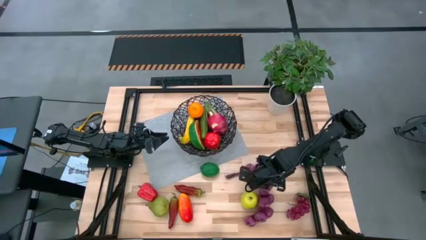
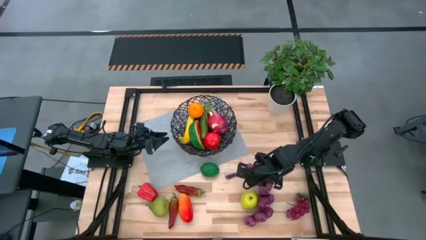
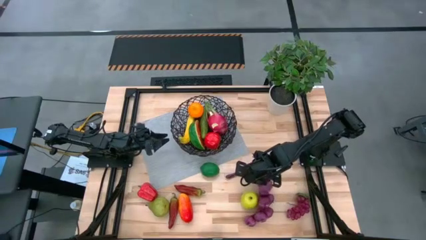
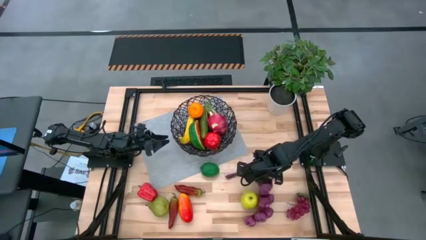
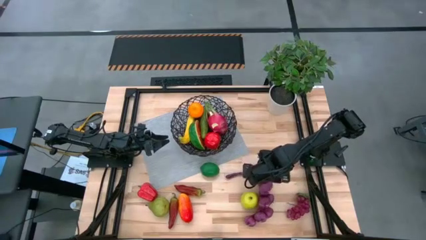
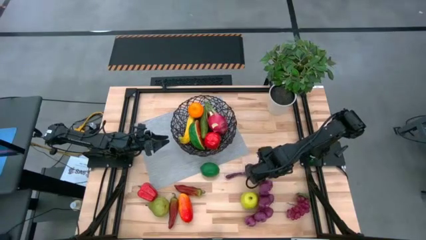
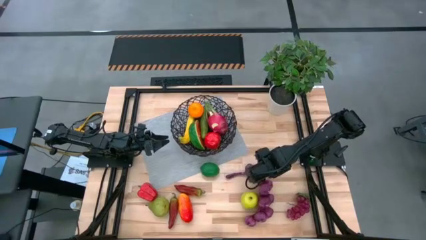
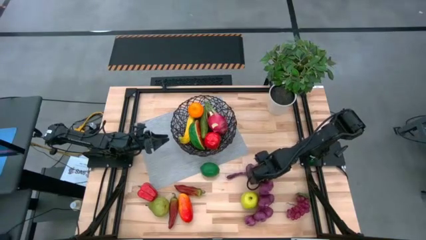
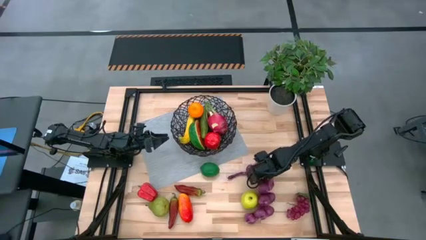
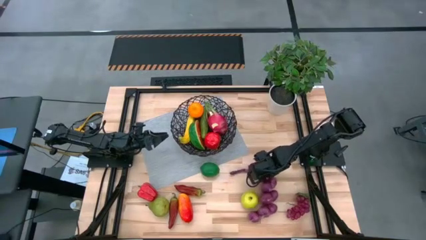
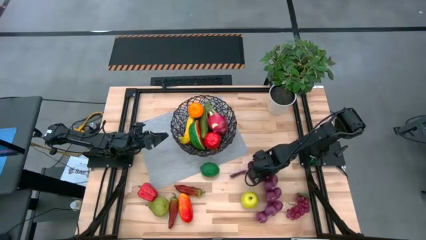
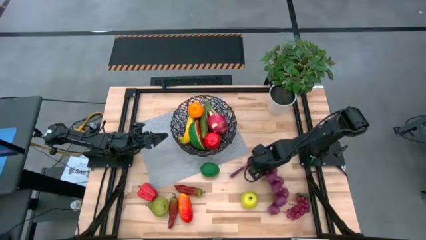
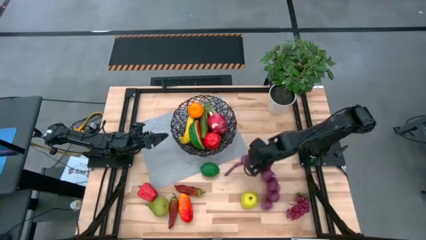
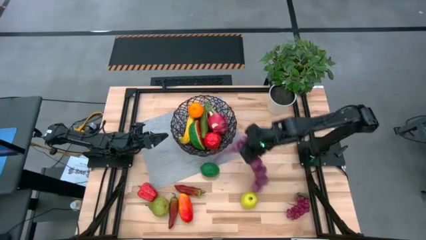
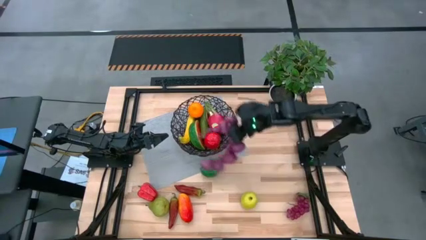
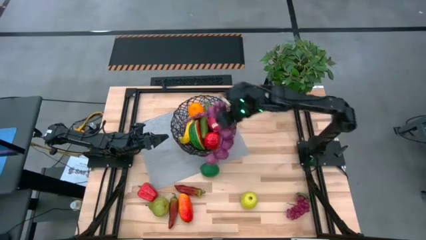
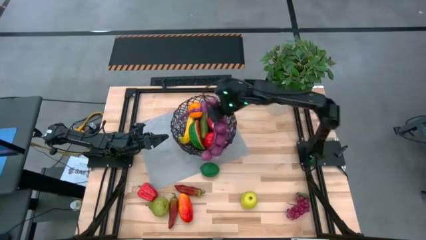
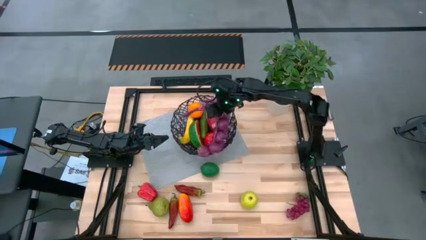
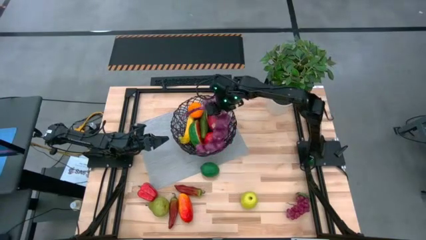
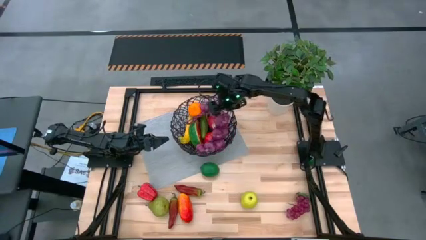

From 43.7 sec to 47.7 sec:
Task: Build produce basket
Put the onions into the wire basket

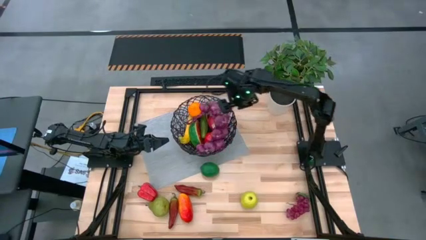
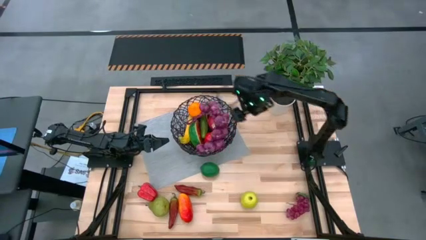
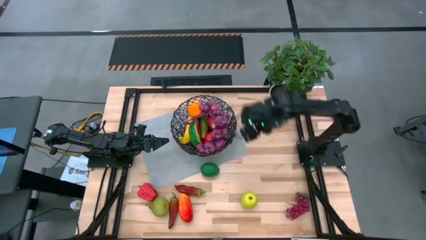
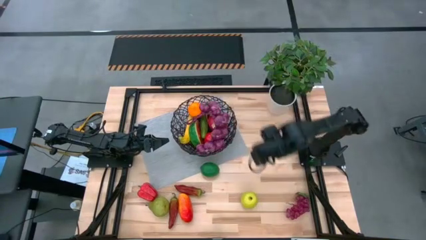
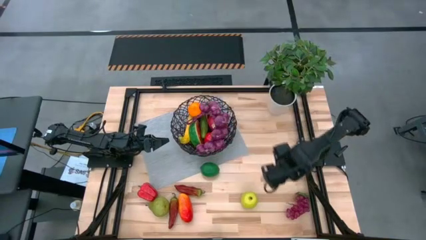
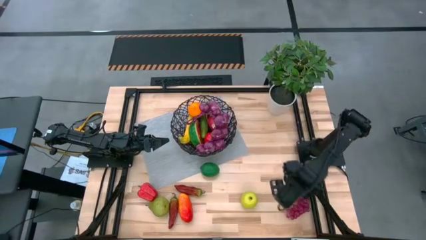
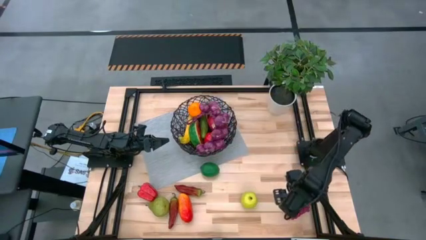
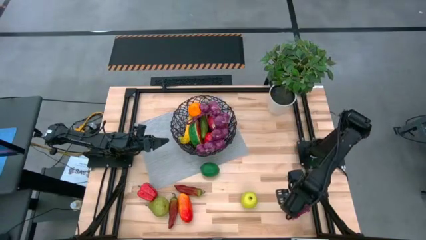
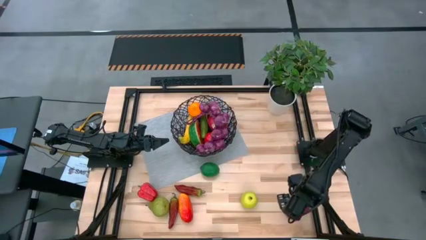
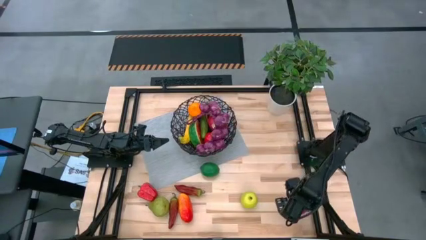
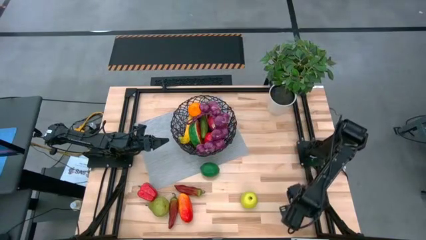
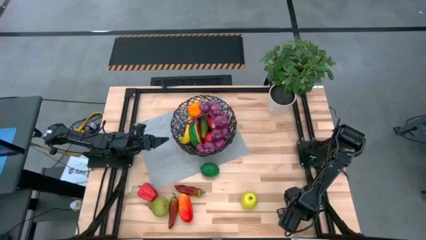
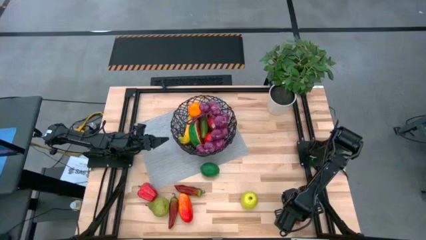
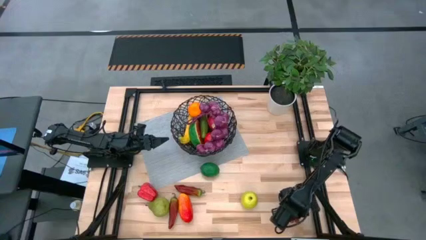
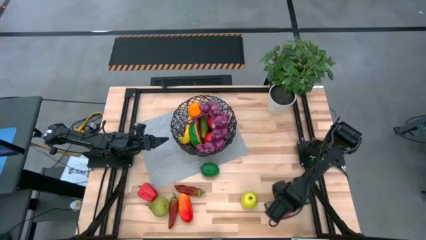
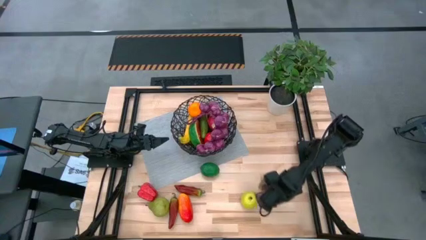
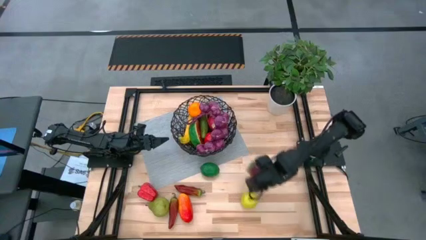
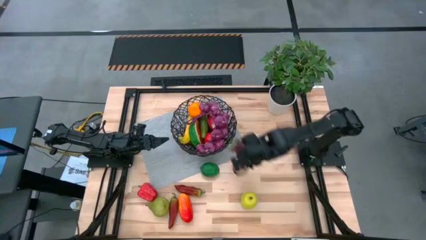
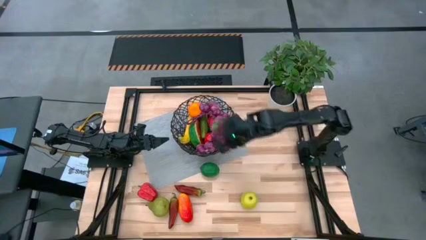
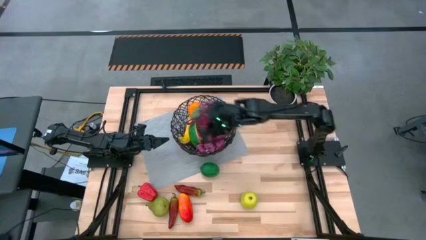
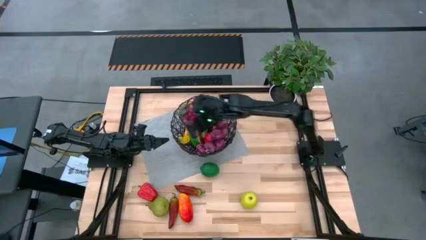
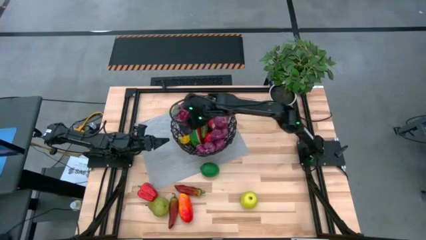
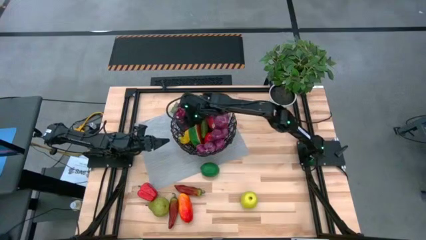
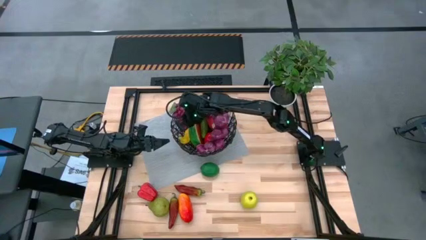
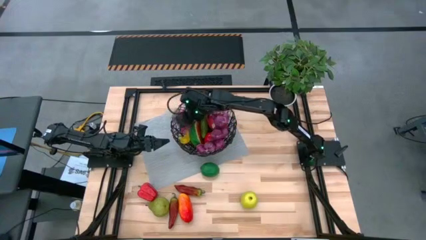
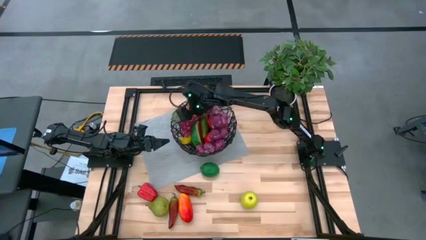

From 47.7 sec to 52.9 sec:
Put the grapes into the wired basket

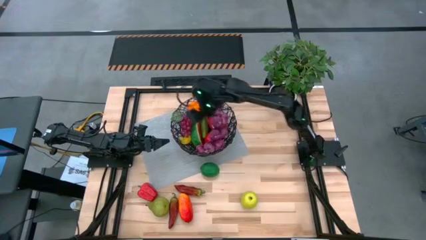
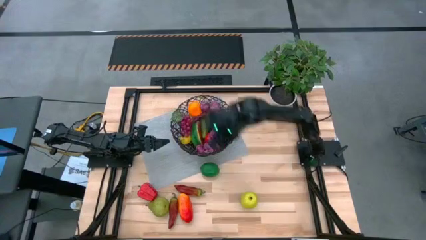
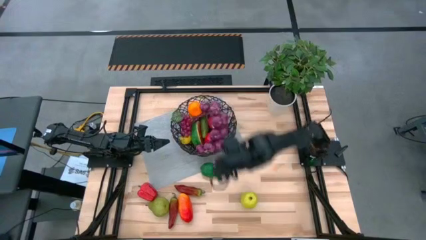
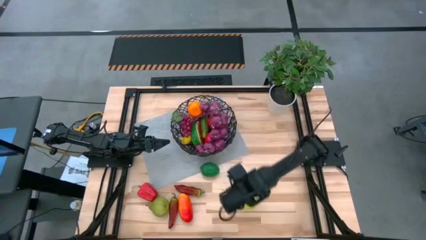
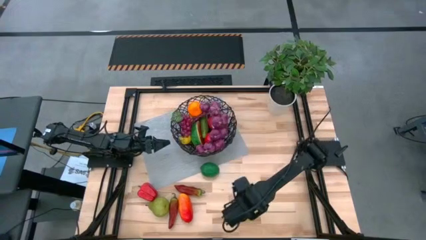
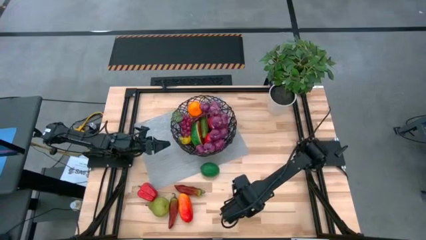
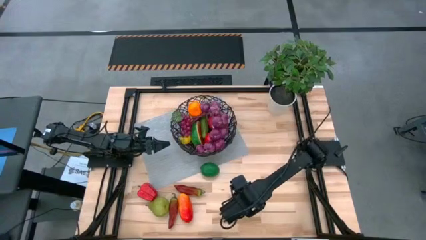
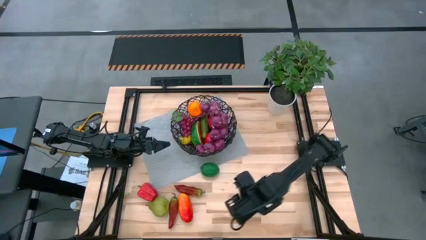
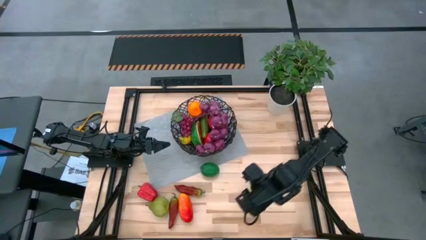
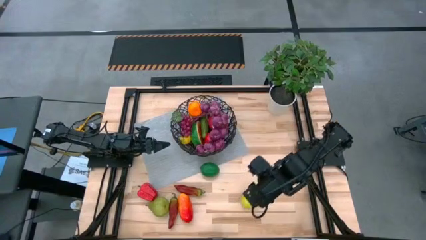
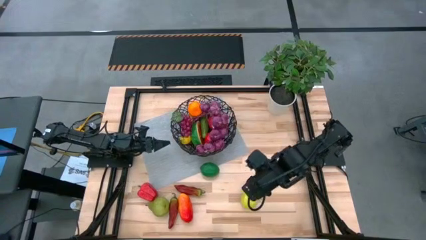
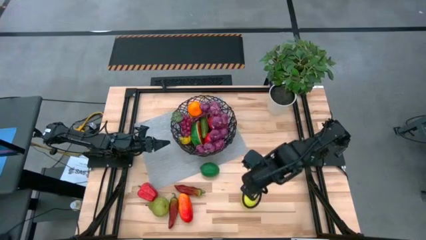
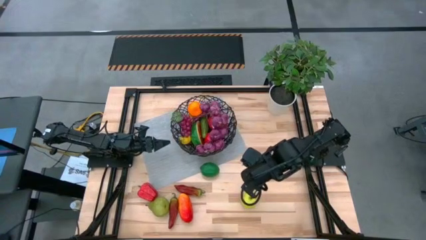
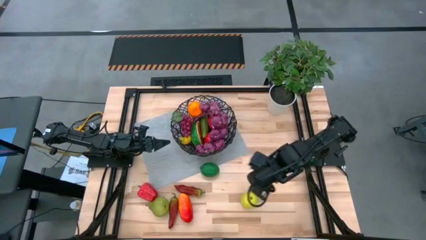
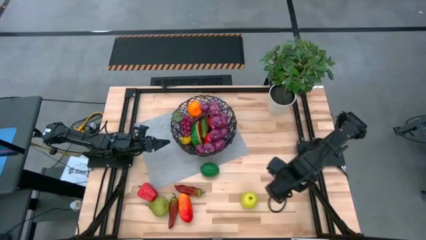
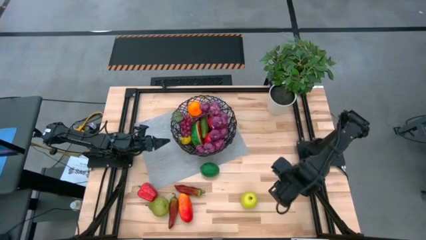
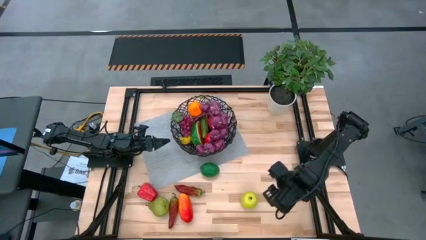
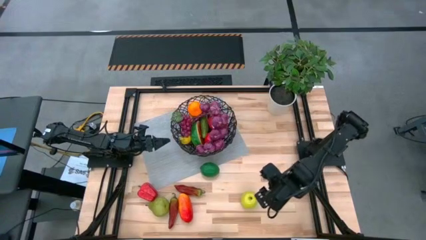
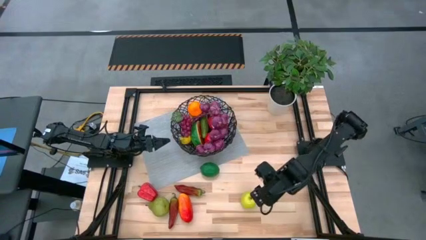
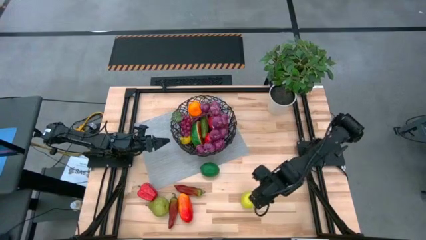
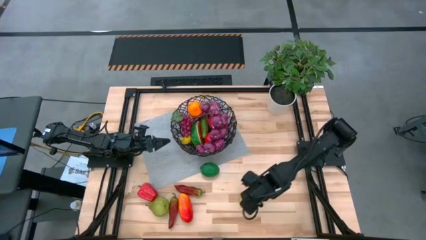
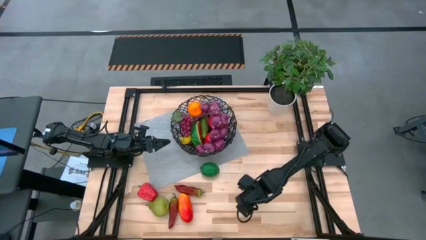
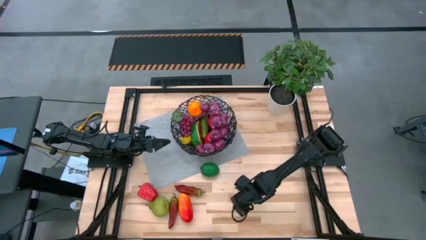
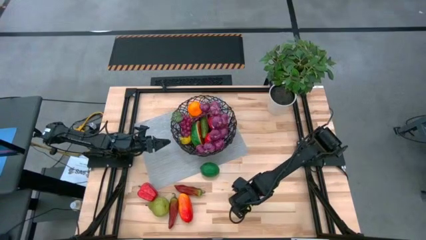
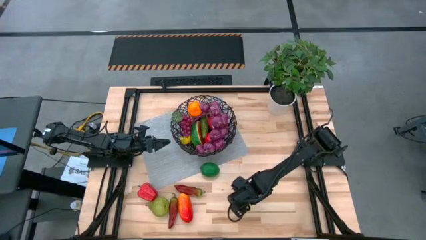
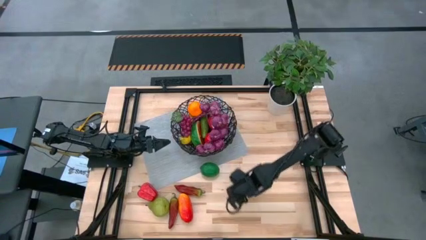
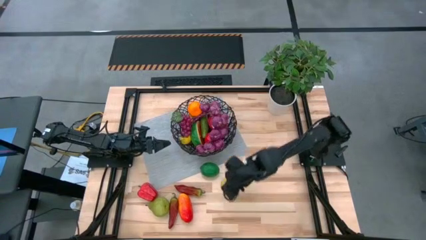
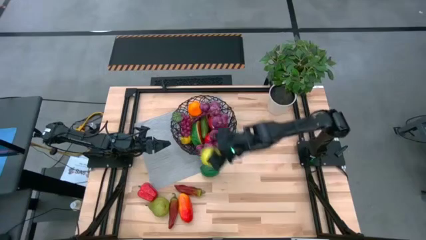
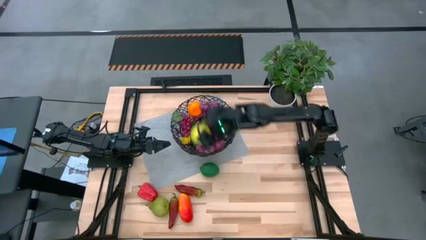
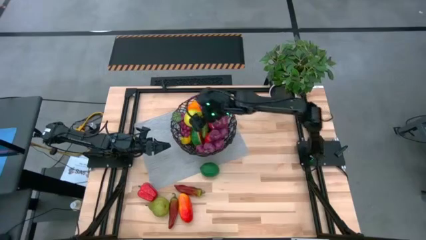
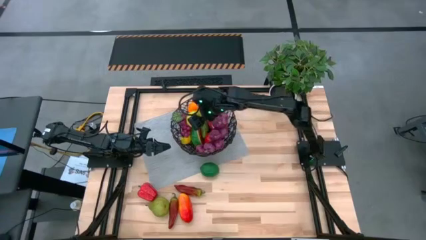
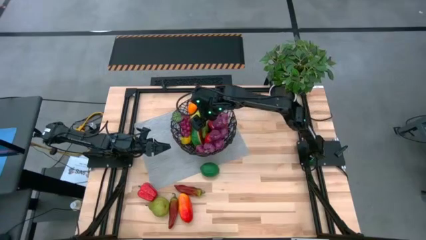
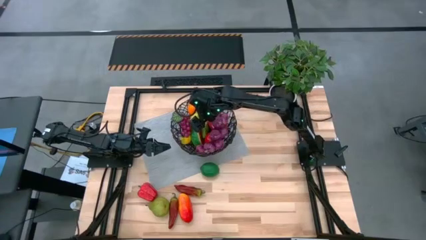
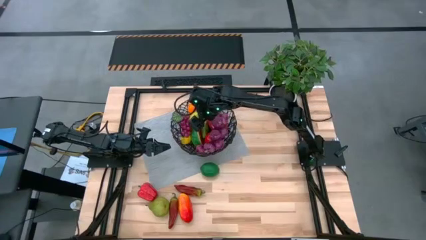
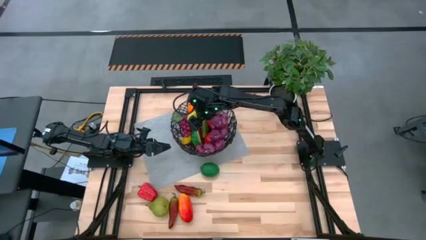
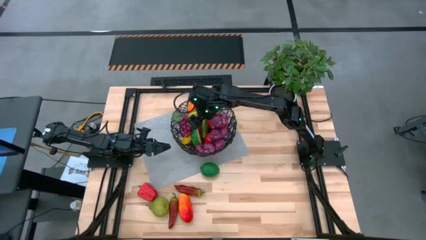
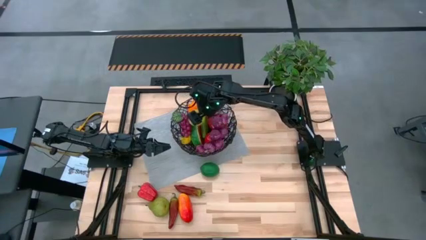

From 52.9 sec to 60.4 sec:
Put the green apple into the wired basket
